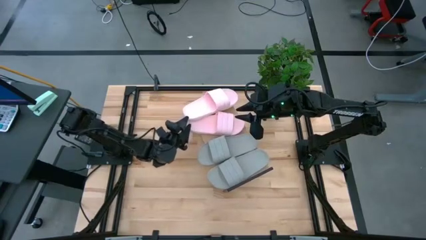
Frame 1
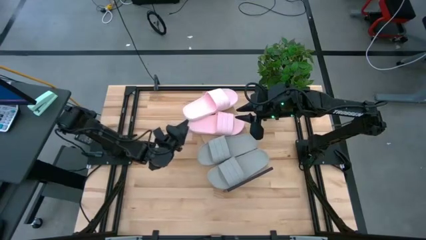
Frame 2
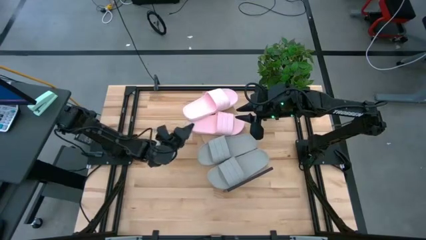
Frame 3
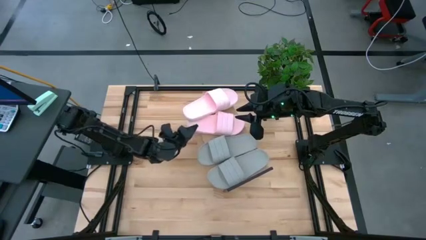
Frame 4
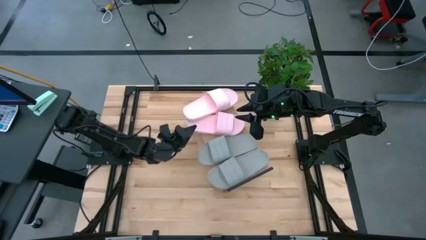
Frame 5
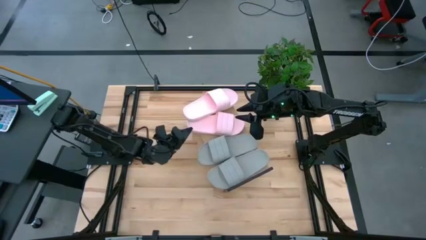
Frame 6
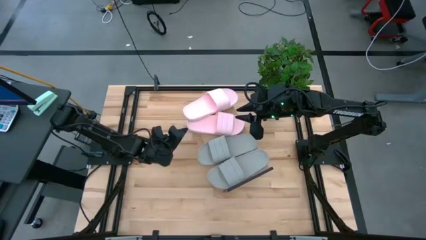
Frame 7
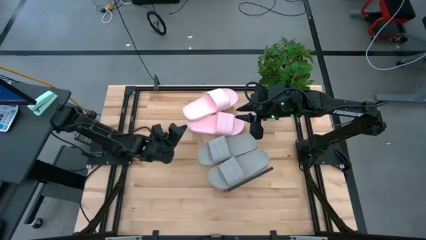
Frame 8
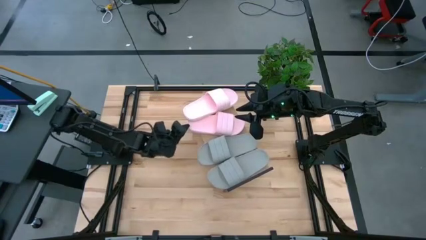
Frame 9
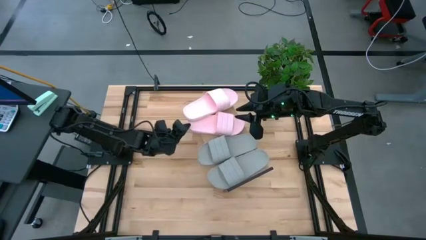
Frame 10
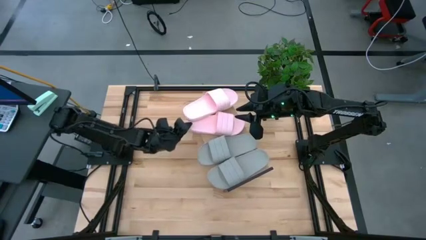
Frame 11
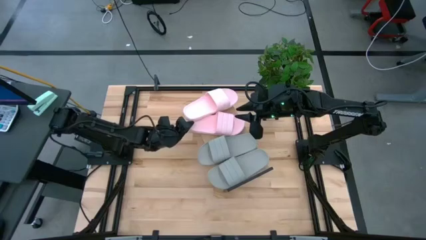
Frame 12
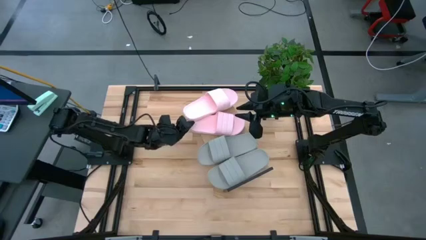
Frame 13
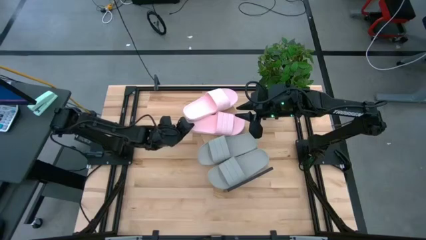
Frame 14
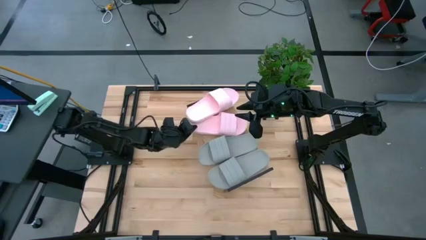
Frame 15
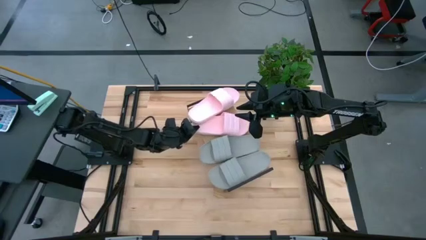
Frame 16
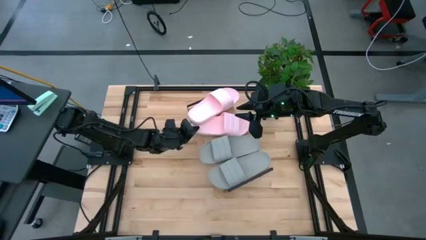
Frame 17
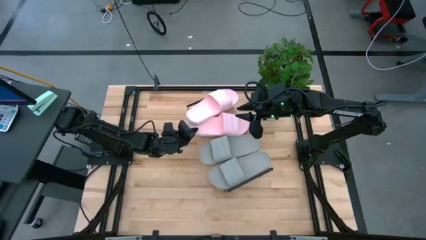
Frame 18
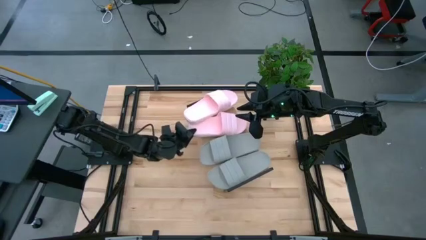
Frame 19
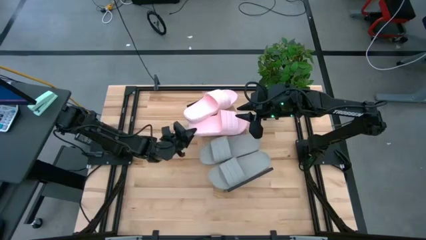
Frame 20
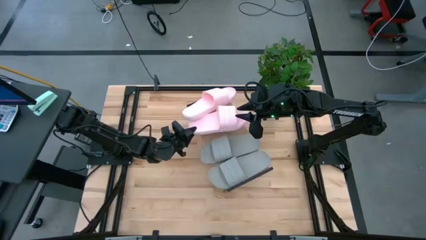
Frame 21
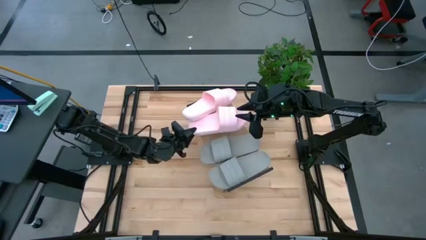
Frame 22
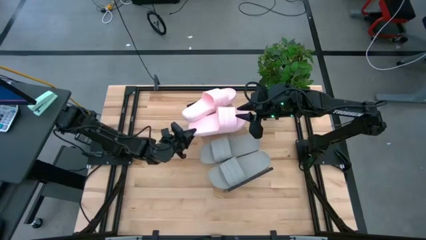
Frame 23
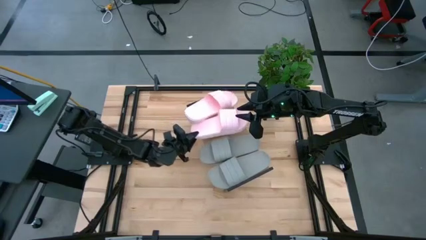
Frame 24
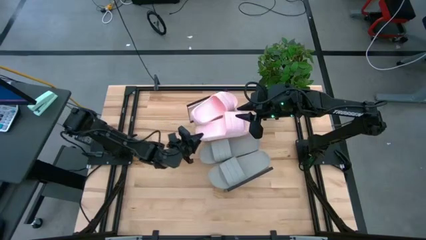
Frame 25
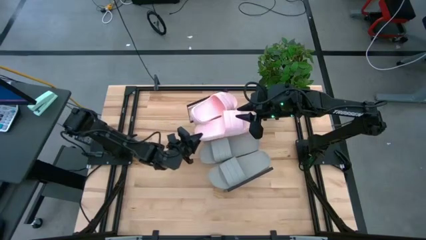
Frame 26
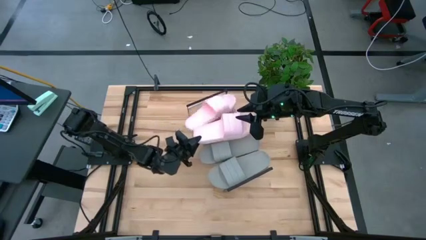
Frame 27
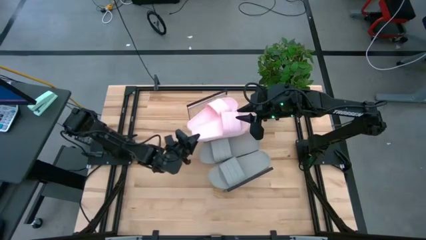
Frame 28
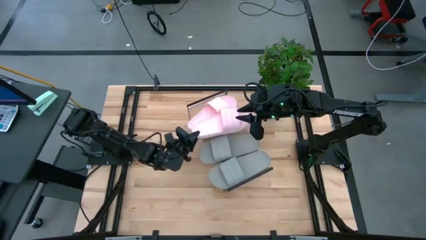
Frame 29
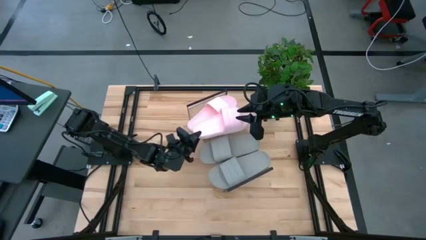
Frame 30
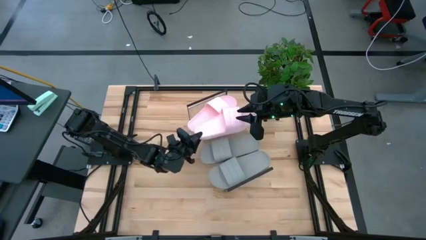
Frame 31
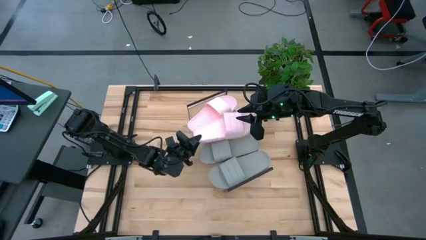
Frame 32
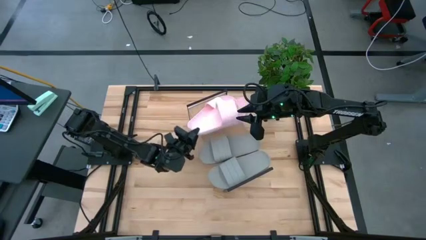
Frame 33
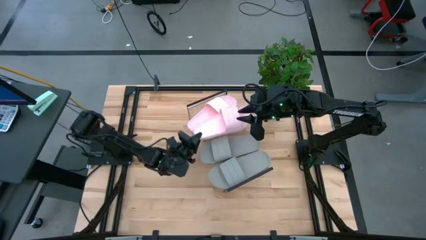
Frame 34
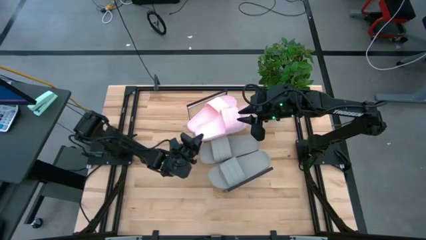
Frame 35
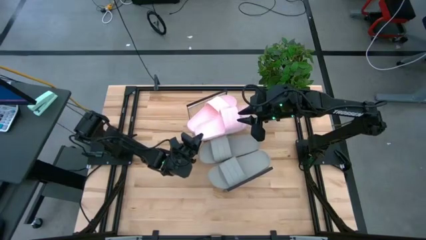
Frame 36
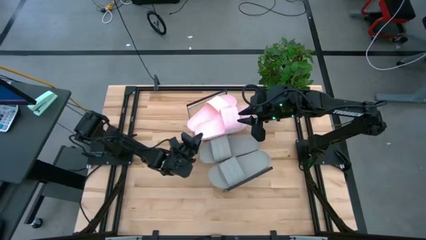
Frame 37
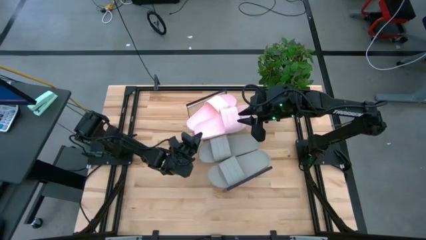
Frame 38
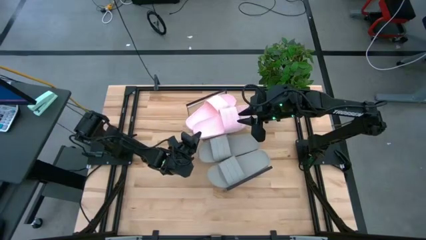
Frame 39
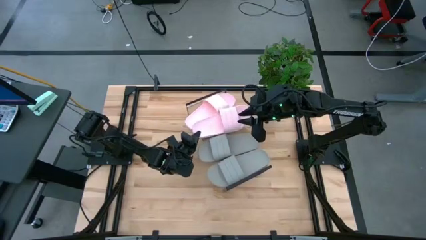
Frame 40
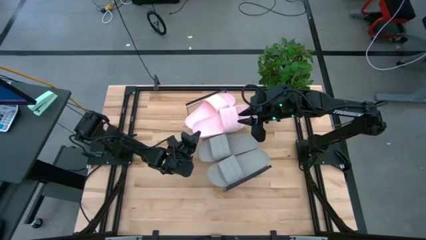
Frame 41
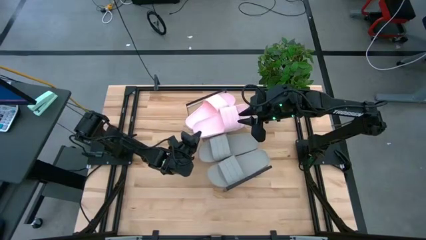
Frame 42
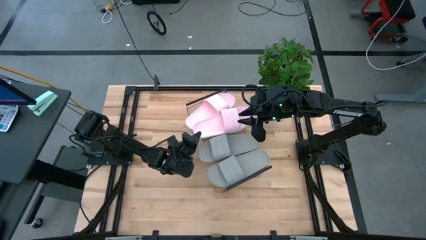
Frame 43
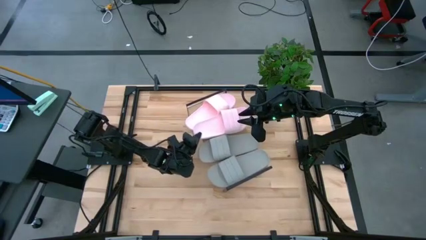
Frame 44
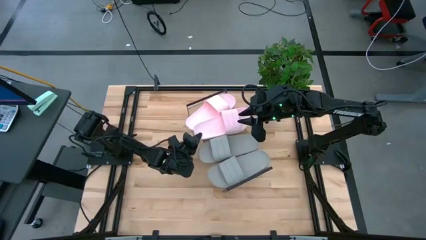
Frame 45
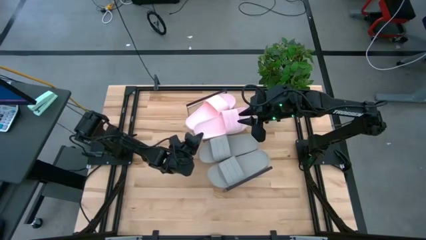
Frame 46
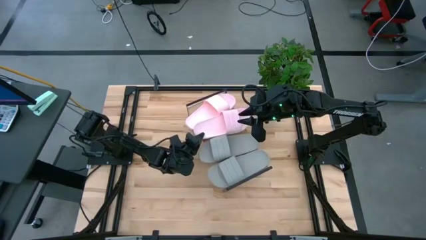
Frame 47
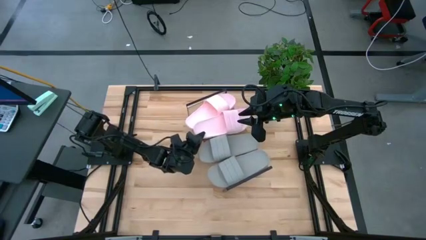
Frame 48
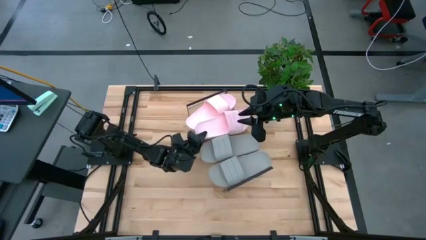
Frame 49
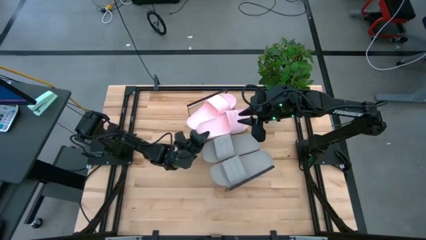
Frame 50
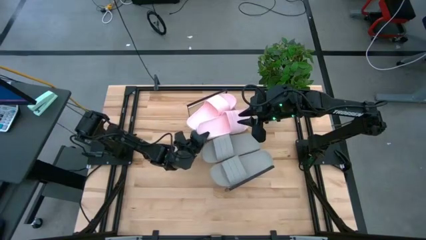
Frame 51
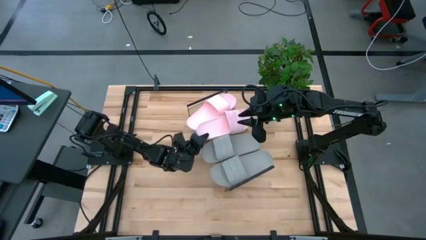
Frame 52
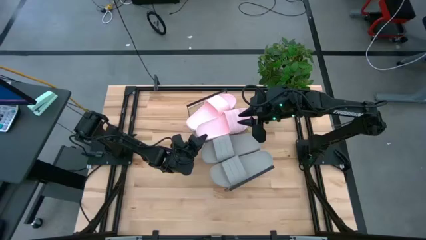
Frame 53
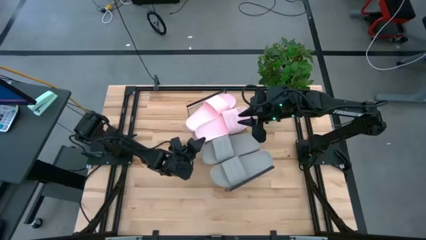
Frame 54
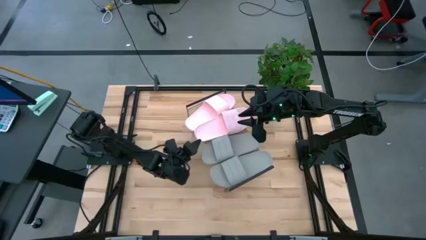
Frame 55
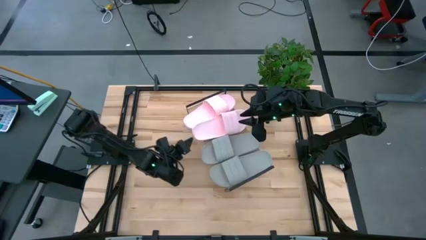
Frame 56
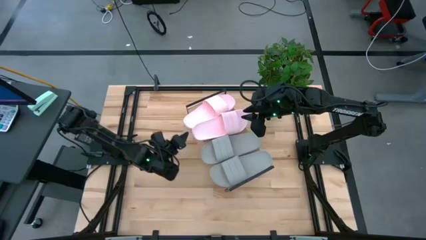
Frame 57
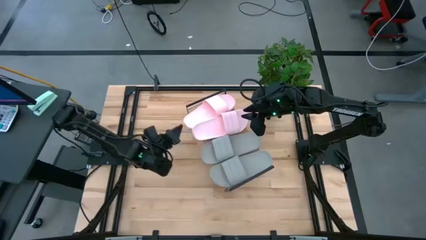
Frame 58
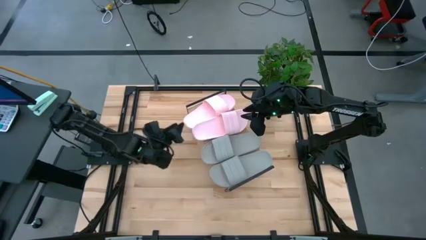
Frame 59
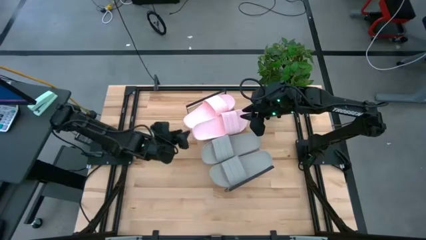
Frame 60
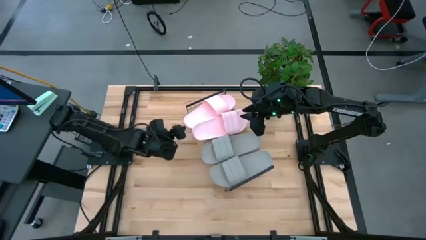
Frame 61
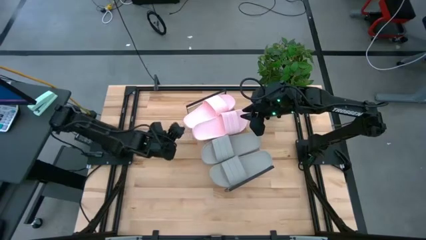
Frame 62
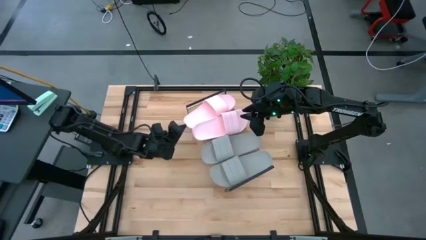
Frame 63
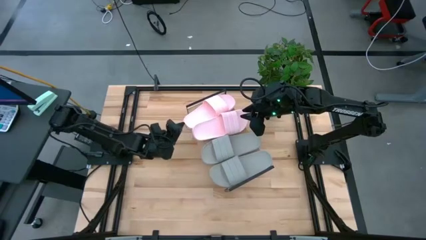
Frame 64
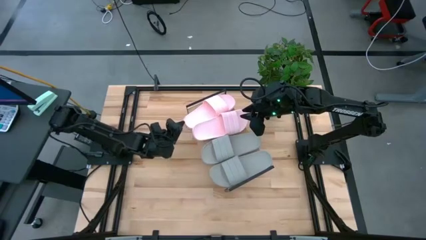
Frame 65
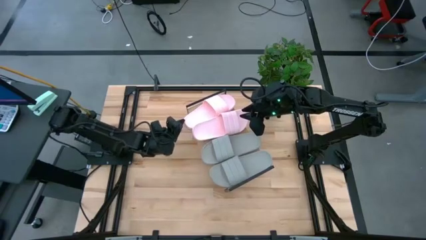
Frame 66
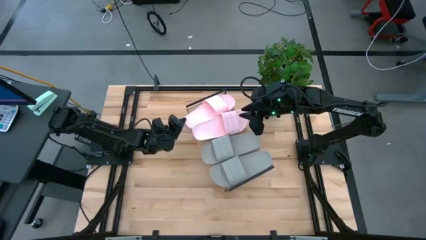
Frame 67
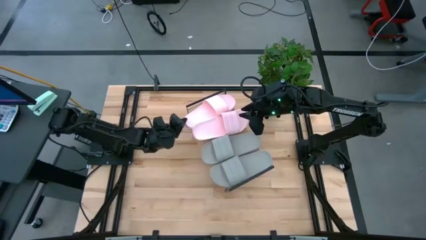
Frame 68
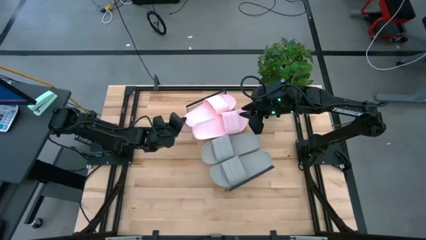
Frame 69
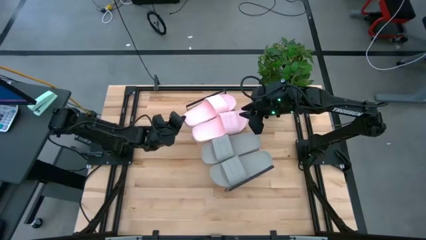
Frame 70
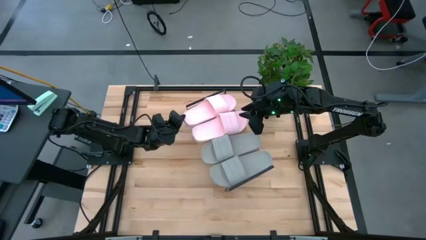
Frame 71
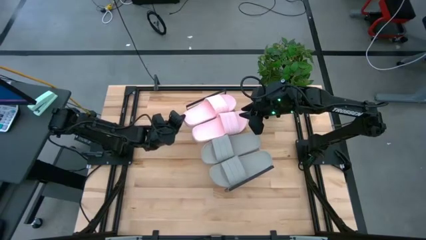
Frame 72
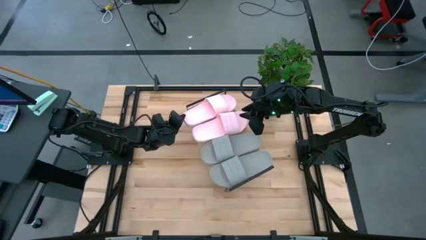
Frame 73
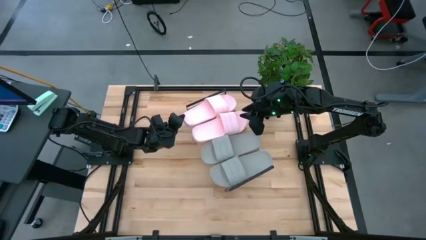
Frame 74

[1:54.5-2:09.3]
Task: Pick and place slides into the shelf
Adjust the pink slippers

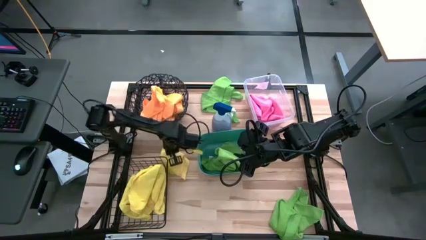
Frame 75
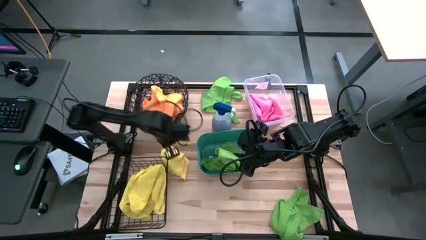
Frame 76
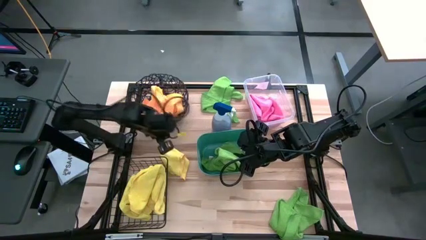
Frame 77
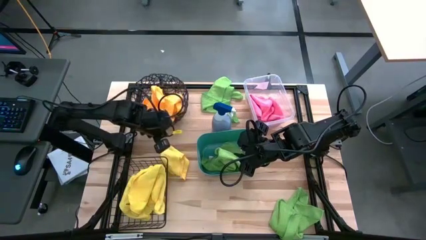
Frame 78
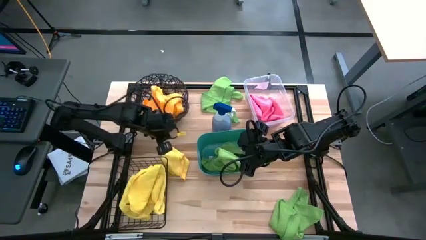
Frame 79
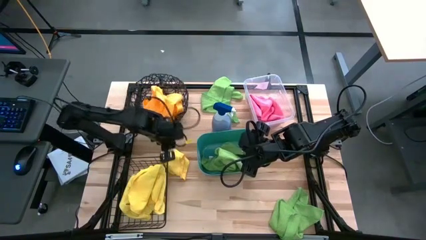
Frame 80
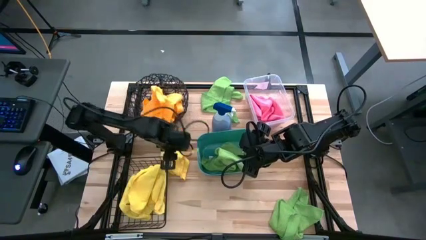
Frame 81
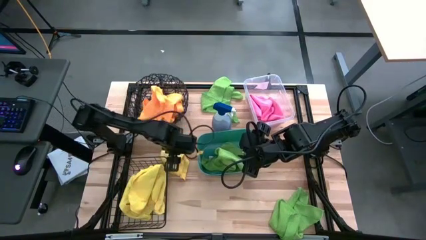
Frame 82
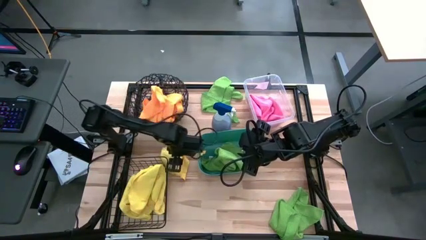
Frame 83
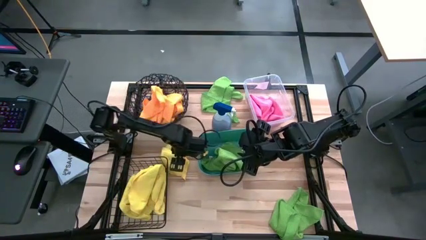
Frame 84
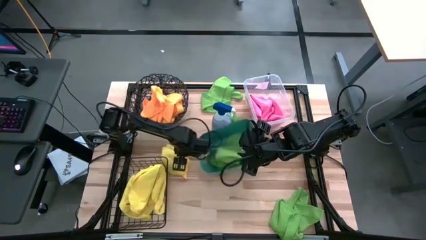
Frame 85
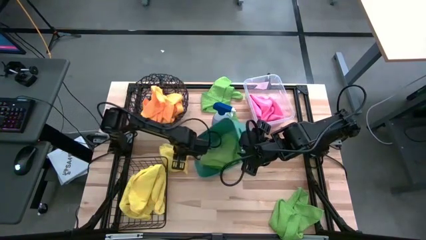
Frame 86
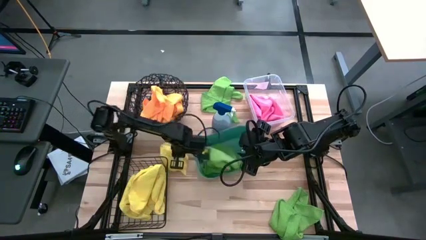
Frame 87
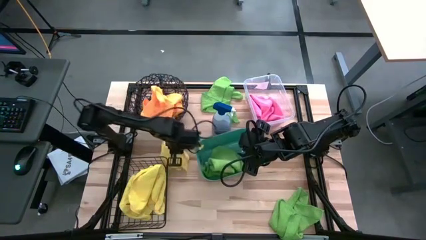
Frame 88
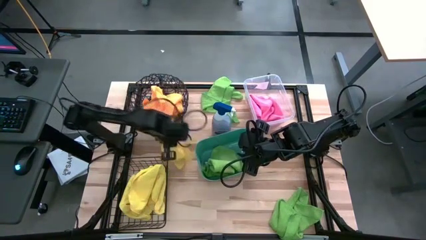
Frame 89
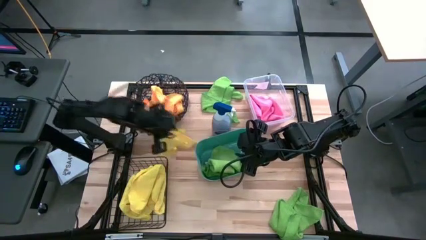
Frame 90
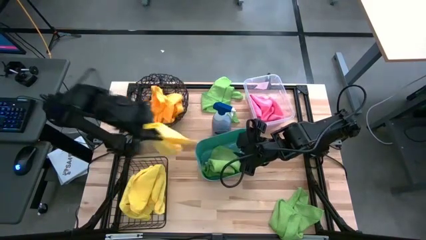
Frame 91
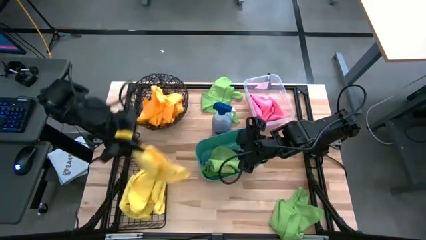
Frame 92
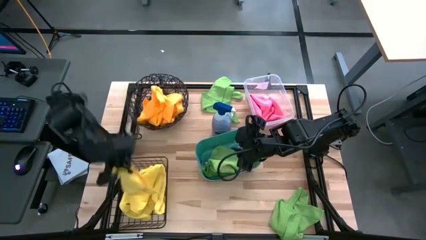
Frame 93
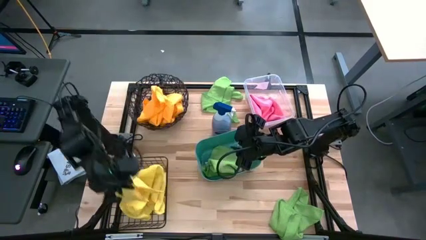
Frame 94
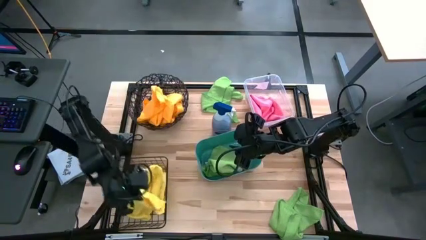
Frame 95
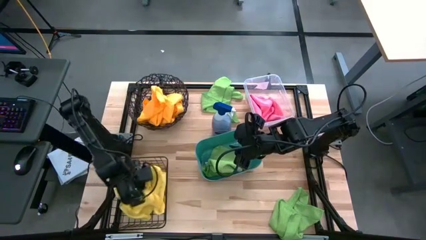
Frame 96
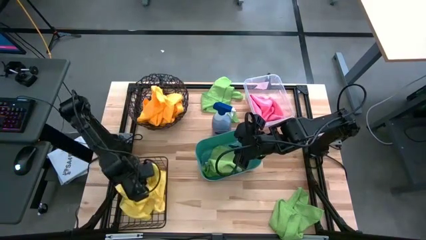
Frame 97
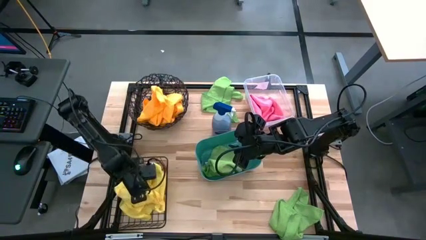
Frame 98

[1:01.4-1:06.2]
Task: Sort microfiber towel by color & place in baskets
Put the yellow towel into the wire basket
